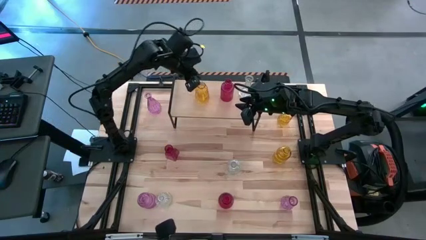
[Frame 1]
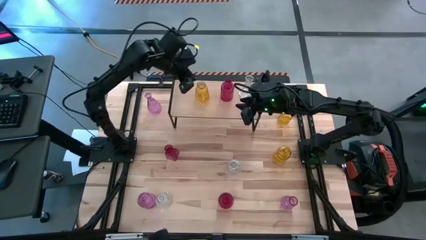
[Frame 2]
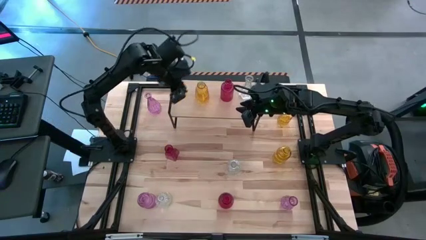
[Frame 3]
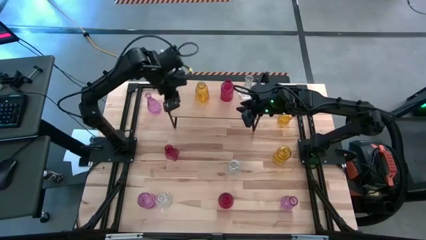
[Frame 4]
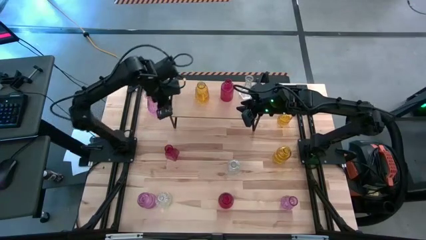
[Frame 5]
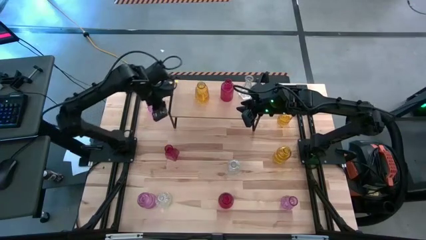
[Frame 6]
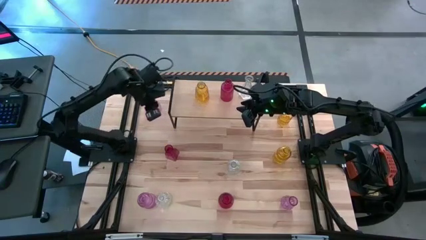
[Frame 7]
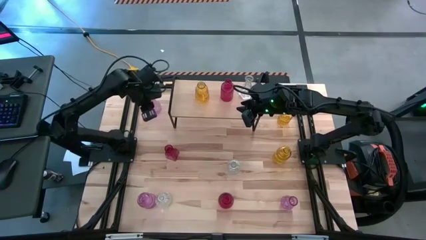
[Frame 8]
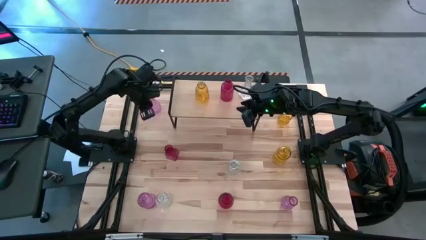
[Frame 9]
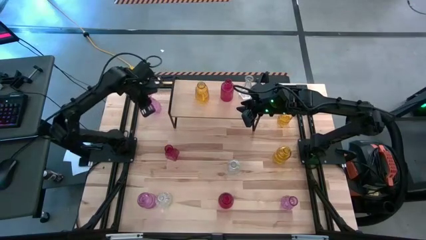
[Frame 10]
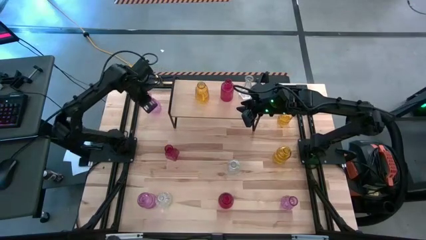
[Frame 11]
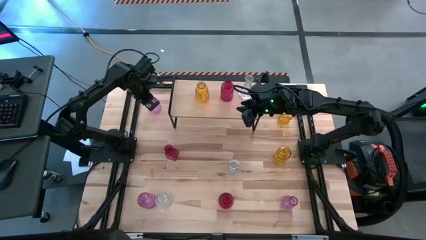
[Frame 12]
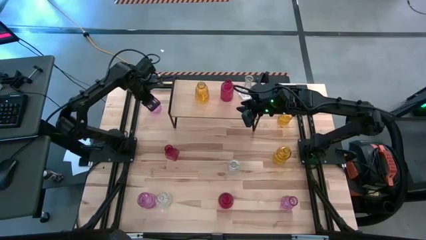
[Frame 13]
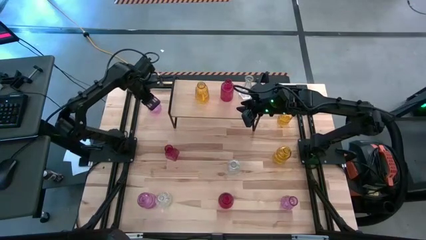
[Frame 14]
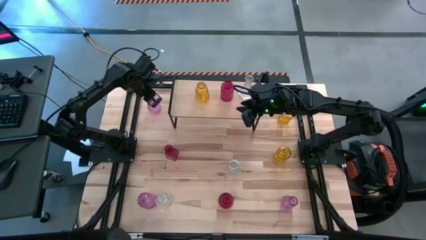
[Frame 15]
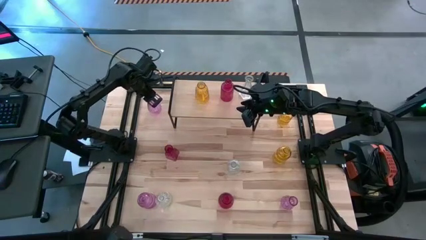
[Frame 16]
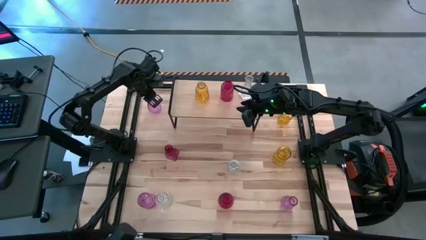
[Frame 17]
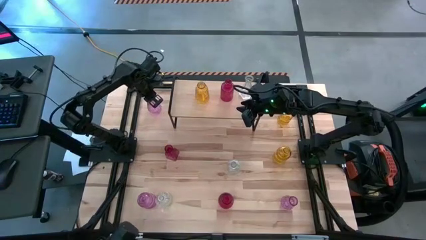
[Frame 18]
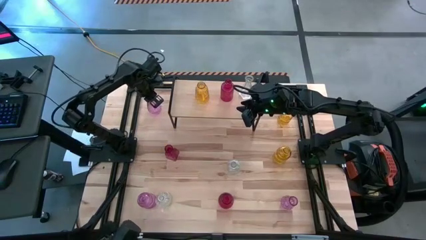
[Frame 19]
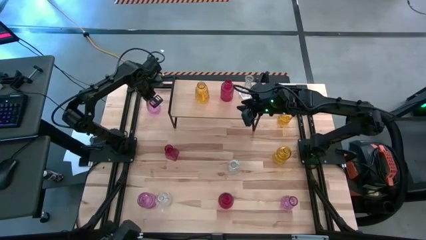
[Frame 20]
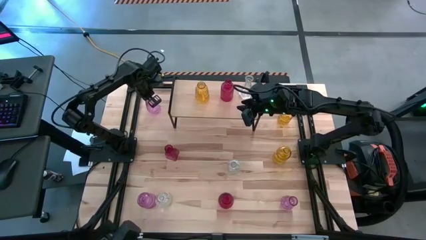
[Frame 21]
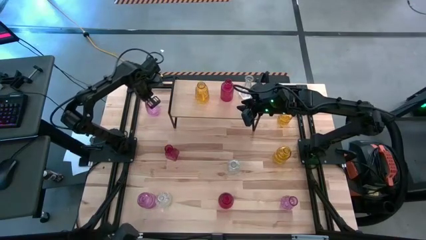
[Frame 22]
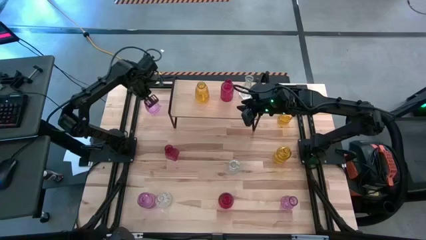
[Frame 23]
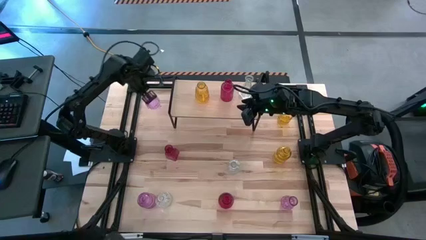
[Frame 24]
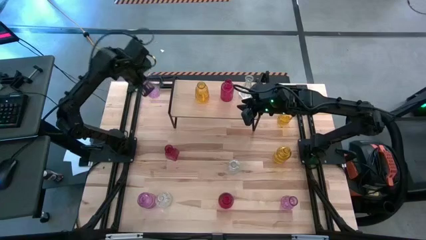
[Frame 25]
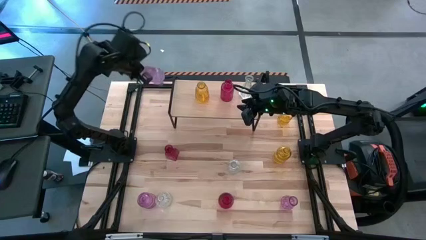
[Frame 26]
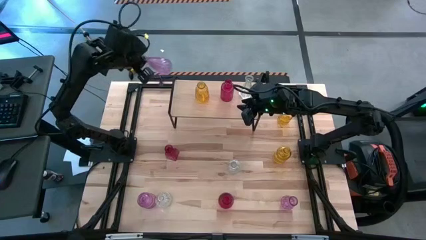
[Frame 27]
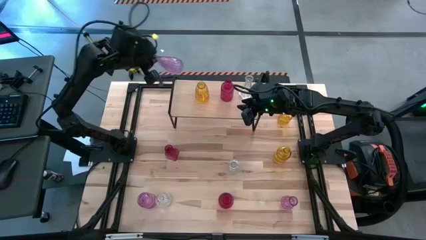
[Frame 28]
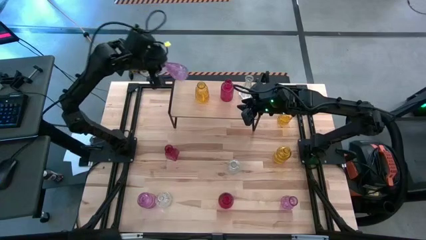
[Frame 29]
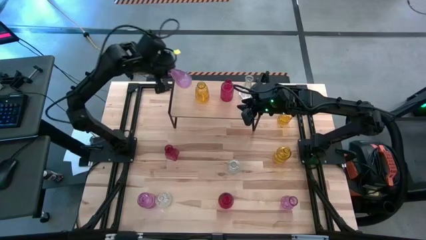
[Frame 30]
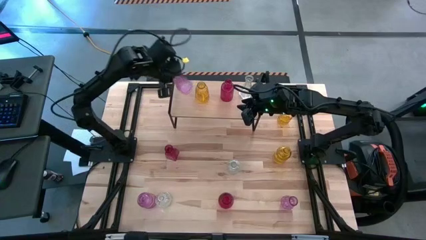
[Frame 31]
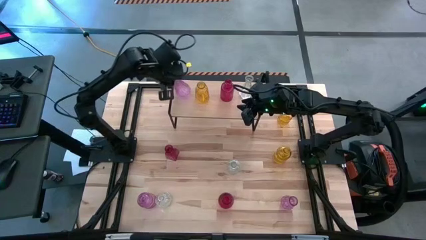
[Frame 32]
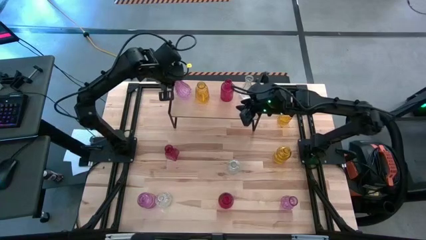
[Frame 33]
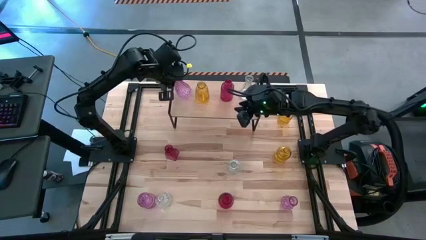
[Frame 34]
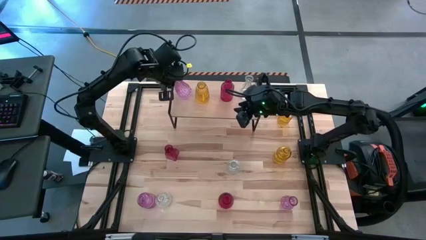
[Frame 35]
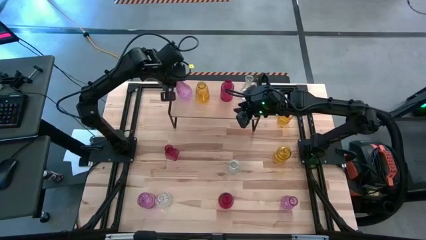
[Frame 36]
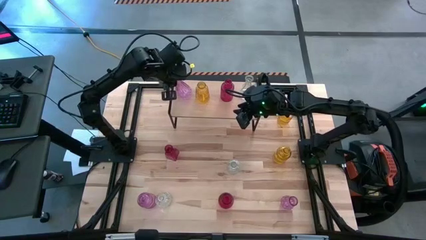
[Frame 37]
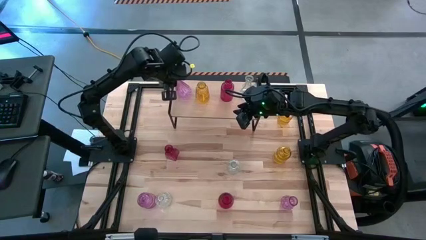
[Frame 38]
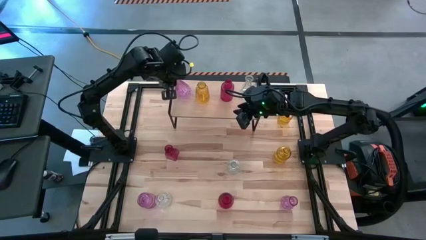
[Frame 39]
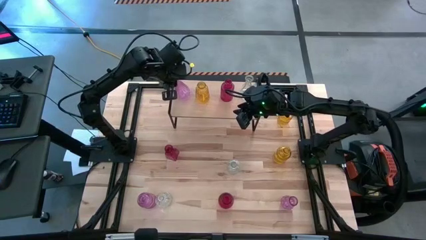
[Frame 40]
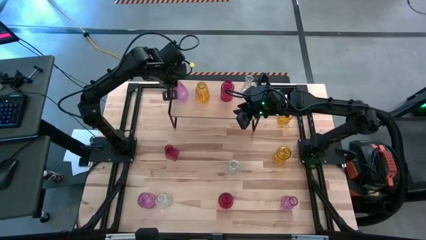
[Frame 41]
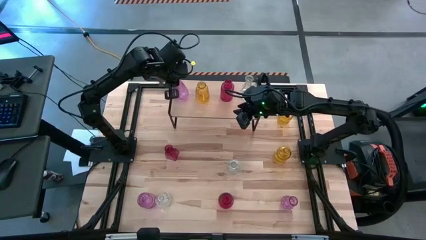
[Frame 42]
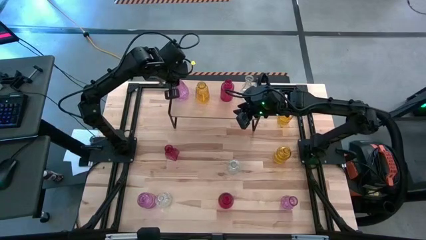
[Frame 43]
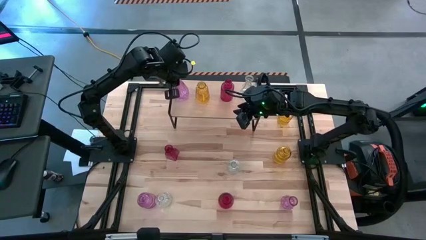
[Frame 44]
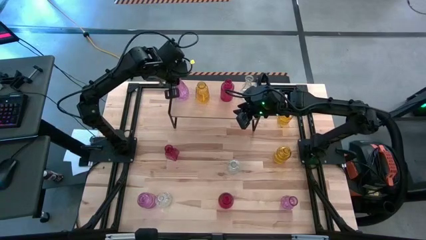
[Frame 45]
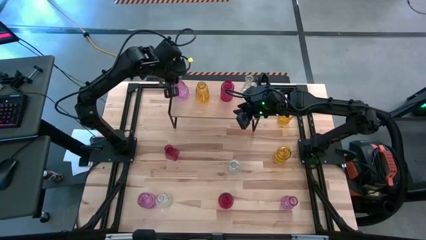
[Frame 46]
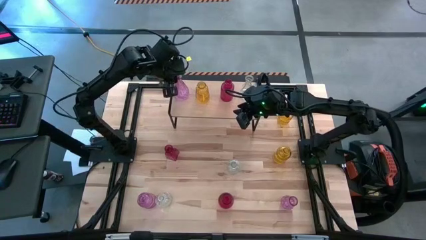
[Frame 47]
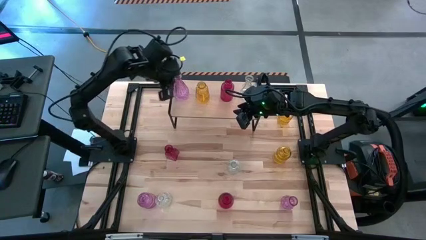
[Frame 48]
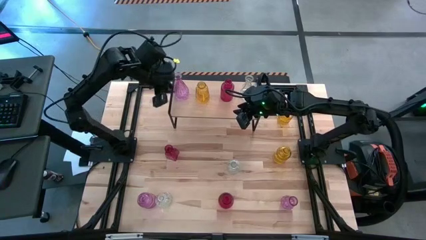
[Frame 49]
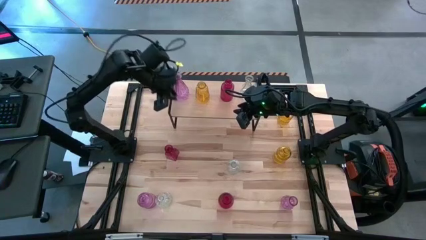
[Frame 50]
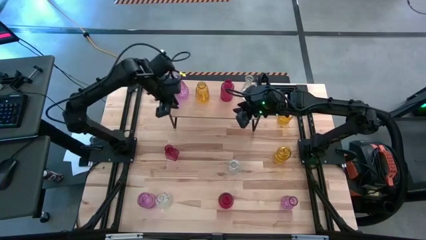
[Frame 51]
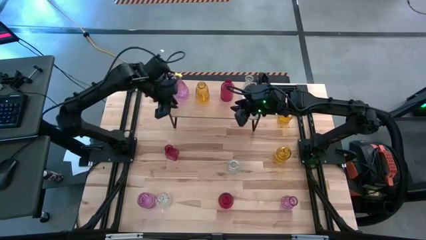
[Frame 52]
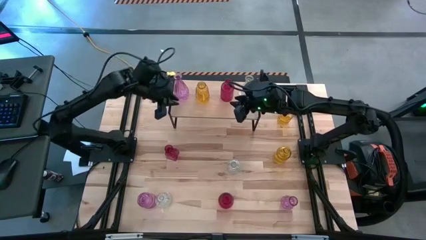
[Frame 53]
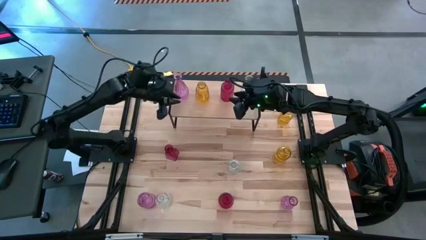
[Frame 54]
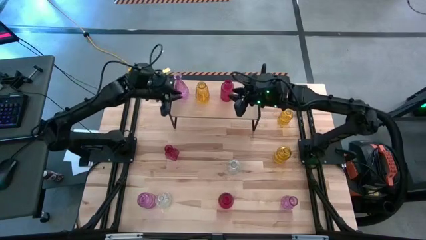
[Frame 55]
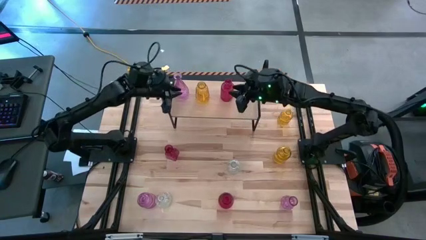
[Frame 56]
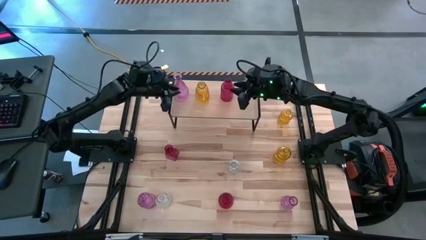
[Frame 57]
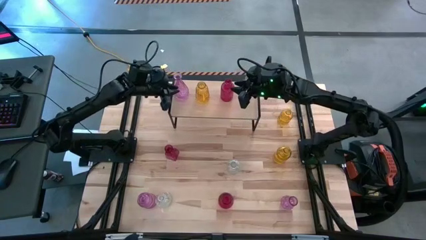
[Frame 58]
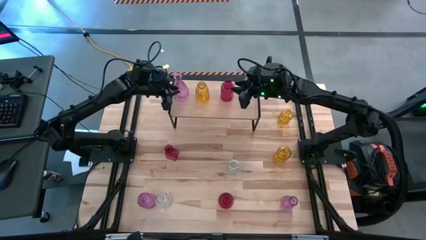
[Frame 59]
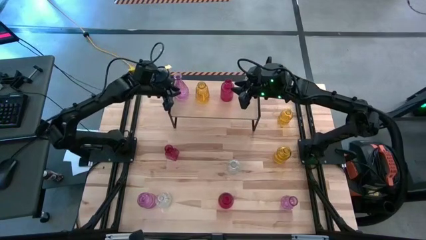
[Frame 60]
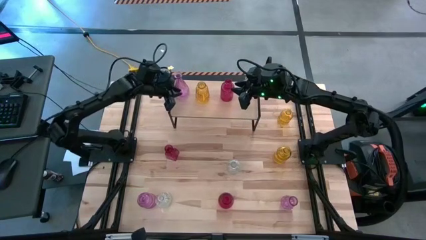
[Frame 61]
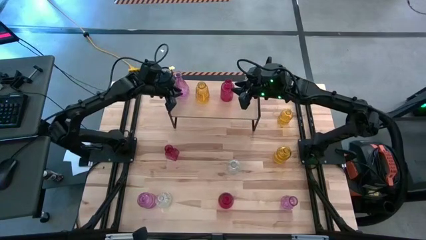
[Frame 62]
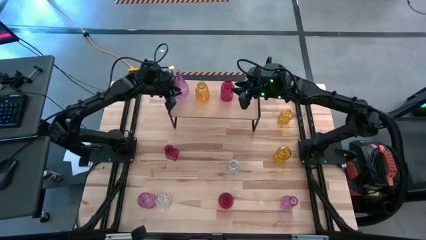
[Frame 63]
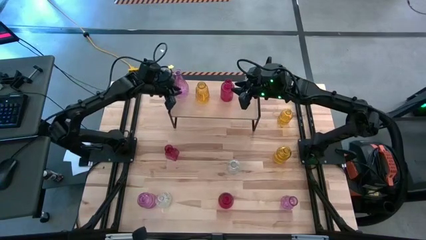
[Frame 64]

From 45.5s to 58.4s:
Task: sort vases onto shelf
Put the top purple vase on the shelf

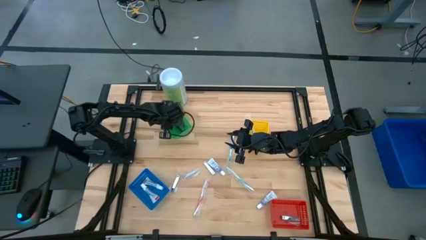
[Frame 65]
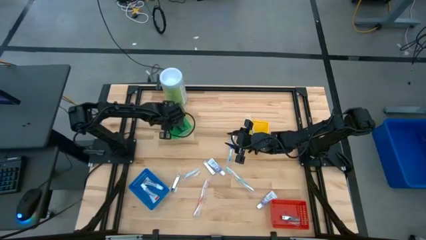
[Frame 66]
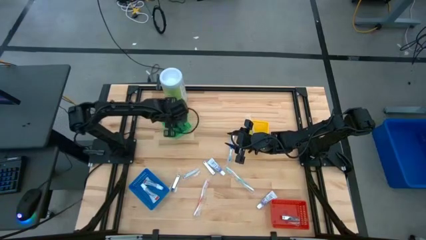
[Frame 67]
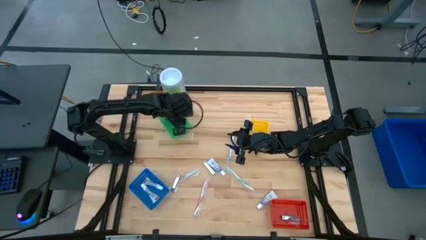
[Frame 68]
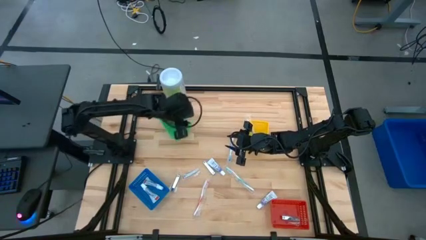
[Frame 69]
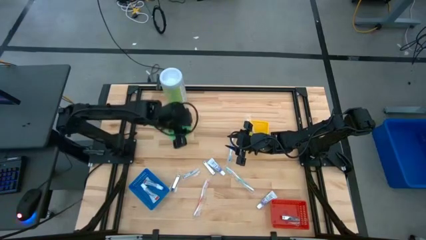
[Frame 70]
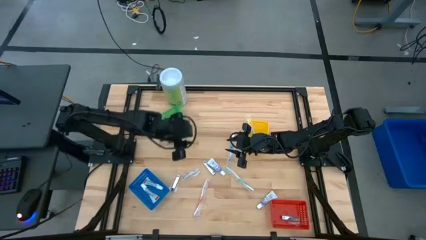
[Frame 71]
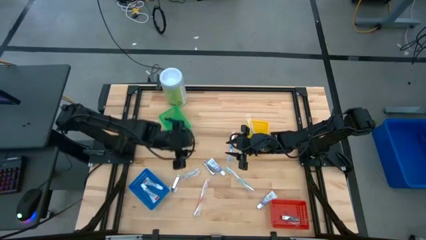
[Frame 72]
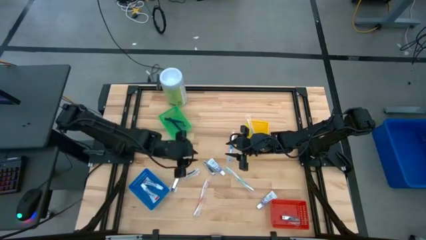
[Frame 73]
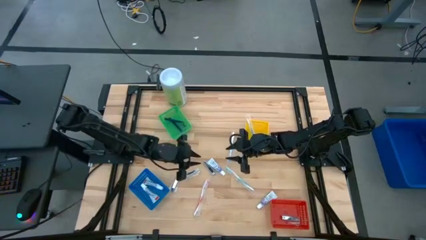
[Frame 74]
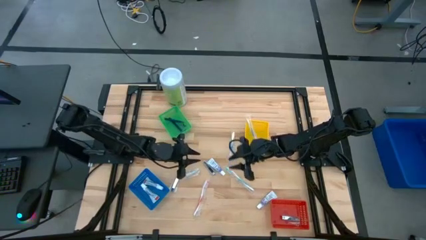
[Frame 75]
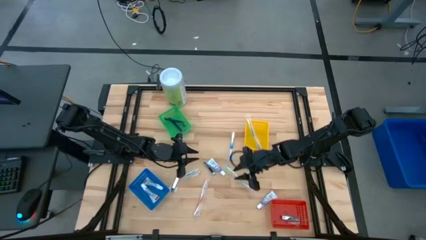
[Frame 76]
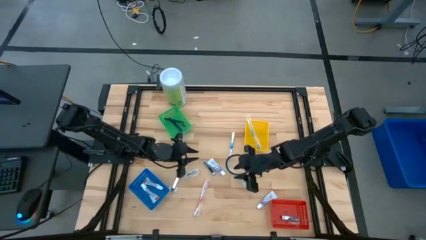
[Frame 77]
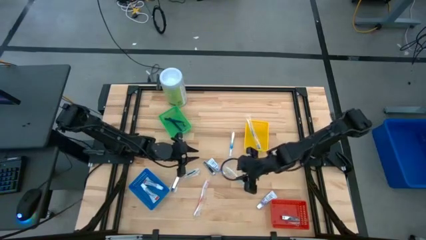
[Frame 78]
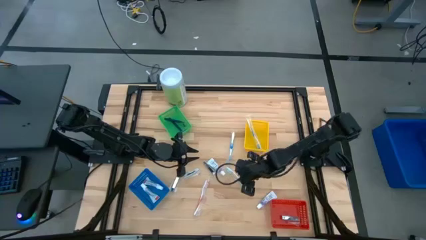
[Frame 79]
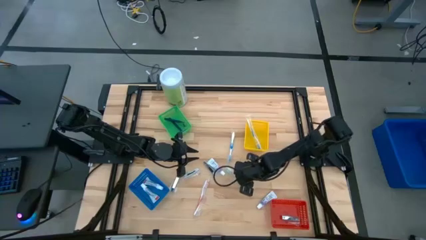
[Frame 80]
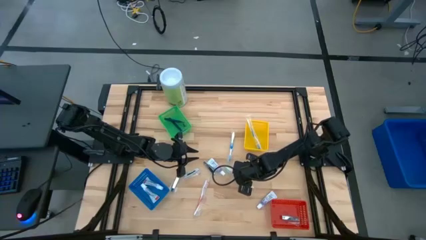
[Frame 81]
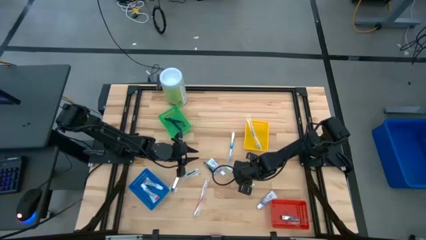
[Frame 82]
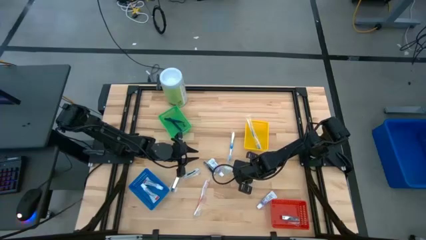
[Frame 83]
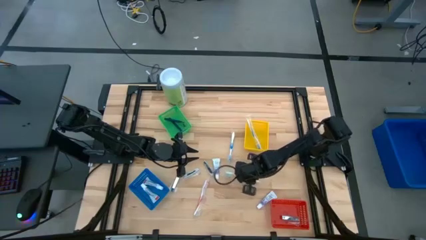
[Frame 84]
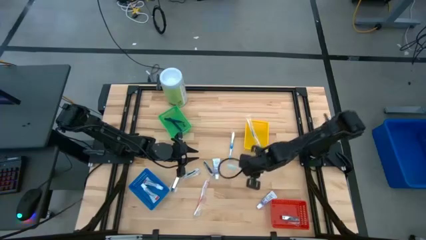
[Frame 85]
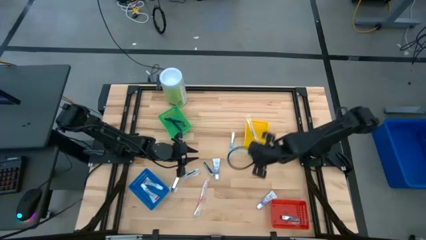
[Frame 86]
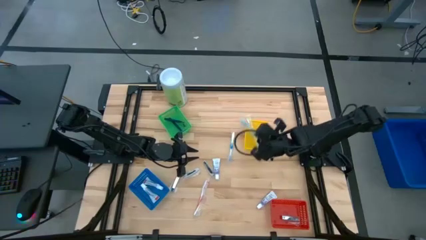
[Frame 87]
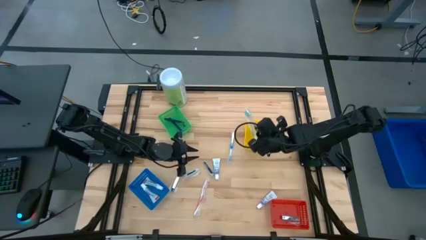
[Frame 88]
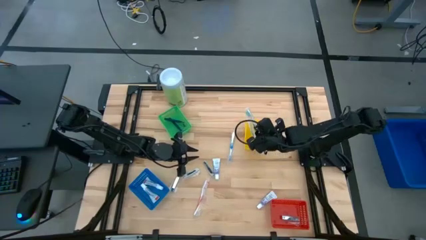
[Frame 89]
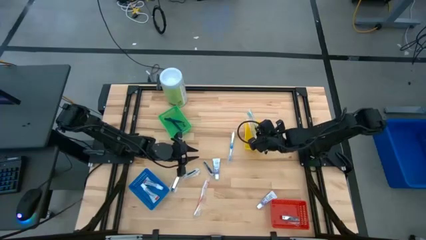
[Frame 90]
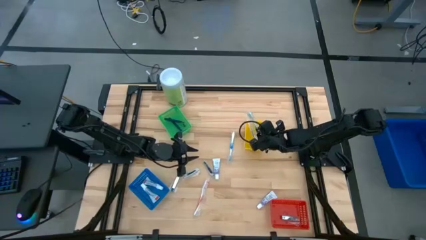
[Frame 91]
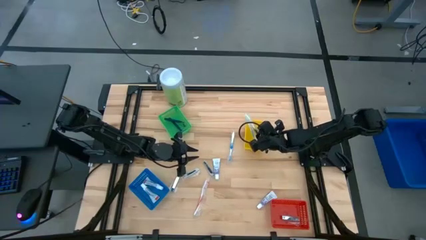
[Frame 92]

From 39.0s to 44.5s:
Task: Pick & Place Travel size toiletries
Put the green toothbrush into the yellow bin
